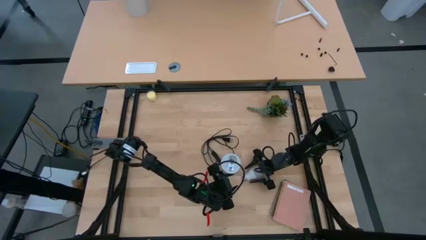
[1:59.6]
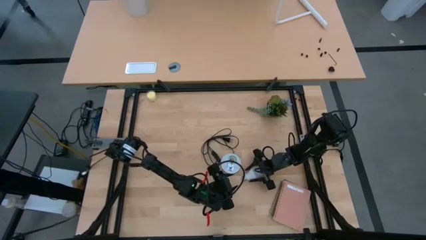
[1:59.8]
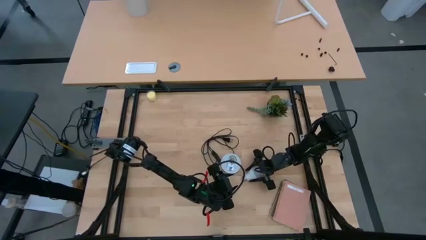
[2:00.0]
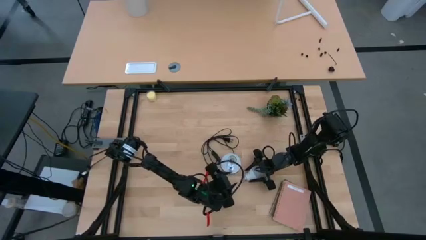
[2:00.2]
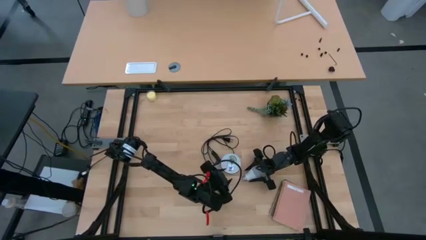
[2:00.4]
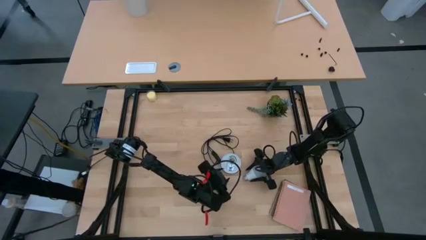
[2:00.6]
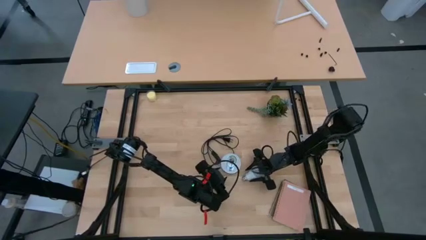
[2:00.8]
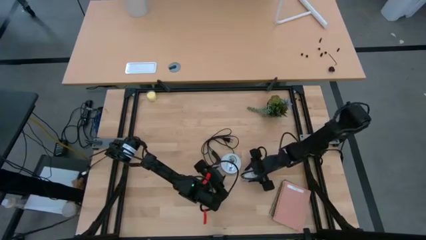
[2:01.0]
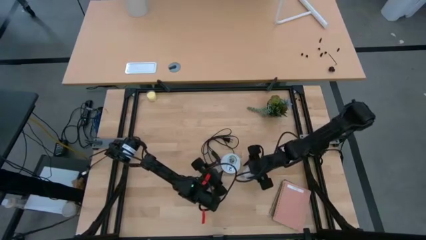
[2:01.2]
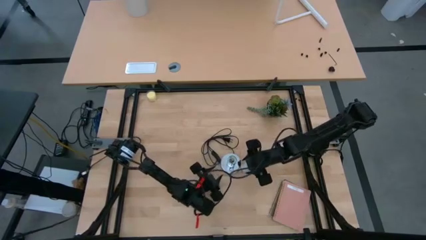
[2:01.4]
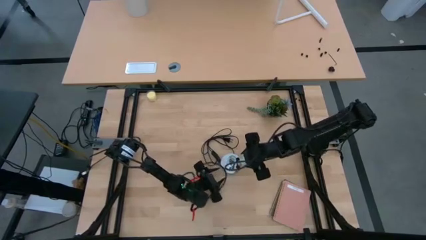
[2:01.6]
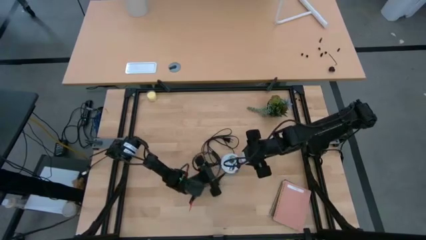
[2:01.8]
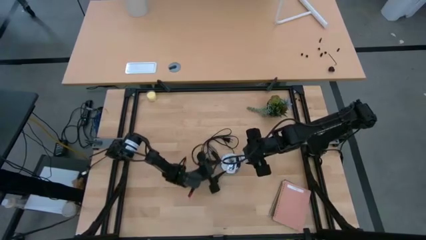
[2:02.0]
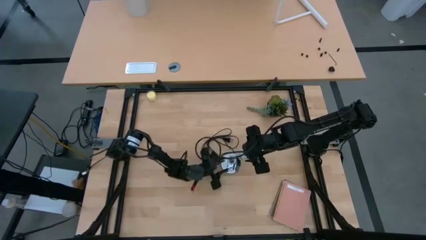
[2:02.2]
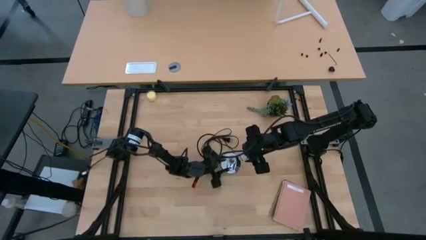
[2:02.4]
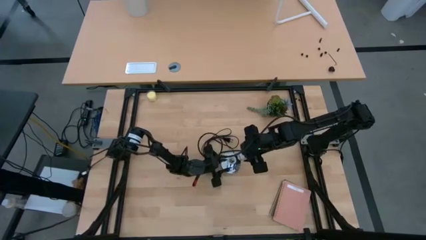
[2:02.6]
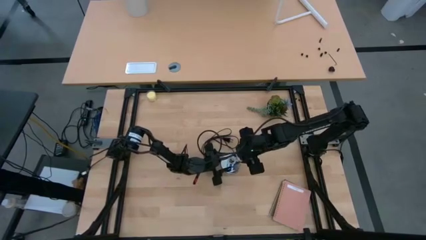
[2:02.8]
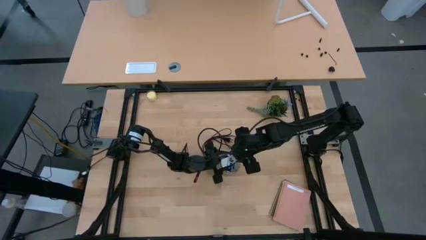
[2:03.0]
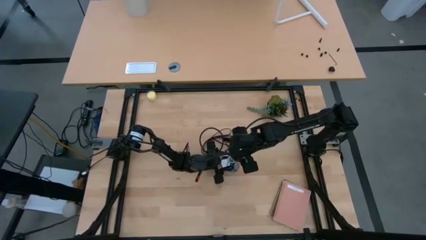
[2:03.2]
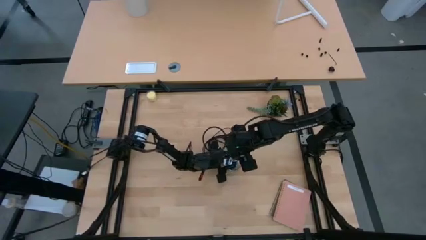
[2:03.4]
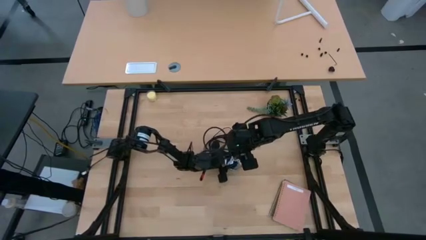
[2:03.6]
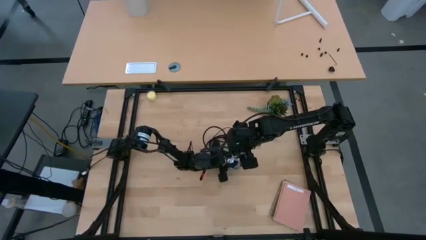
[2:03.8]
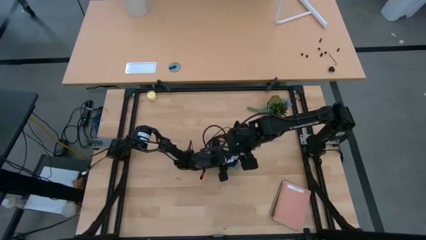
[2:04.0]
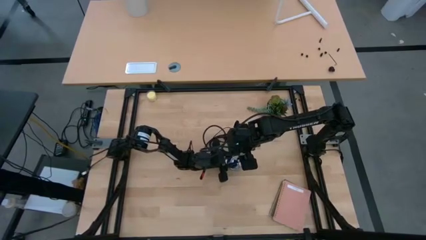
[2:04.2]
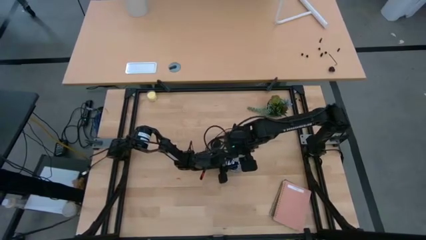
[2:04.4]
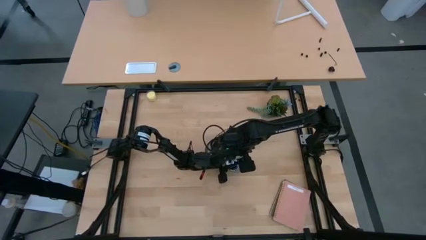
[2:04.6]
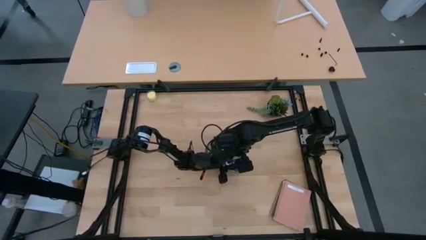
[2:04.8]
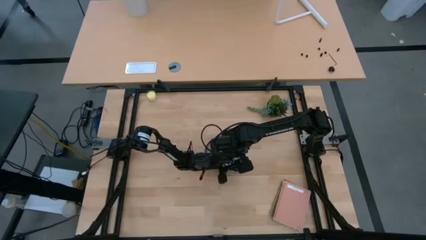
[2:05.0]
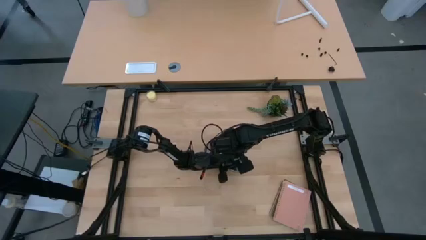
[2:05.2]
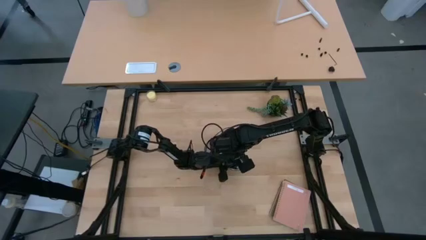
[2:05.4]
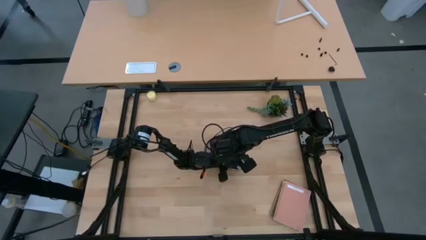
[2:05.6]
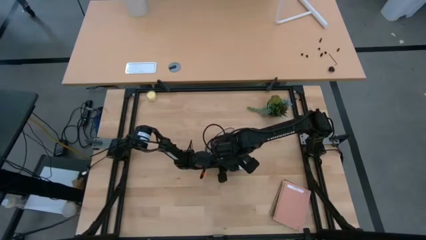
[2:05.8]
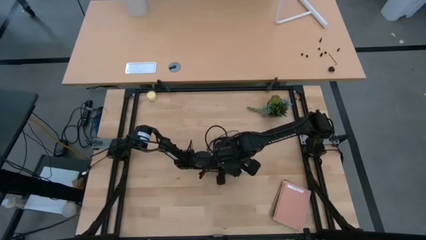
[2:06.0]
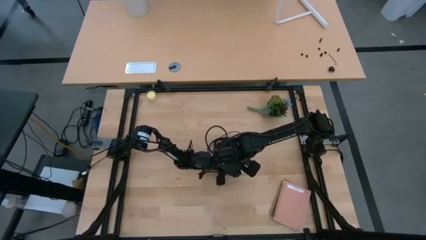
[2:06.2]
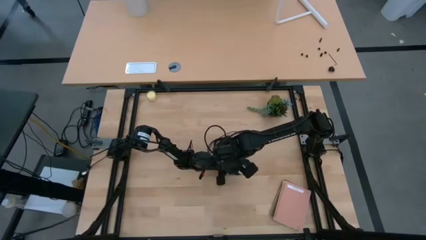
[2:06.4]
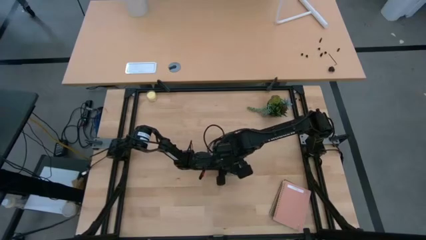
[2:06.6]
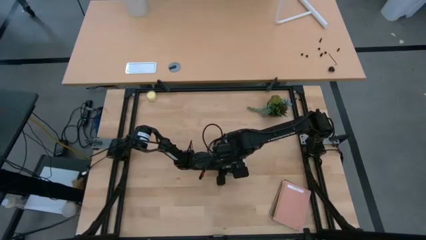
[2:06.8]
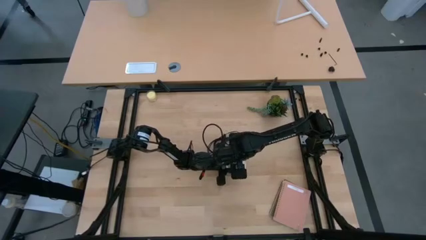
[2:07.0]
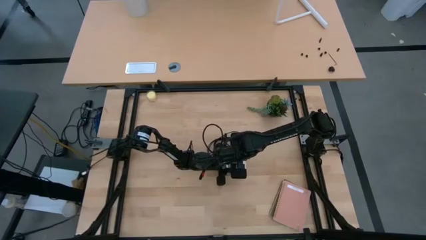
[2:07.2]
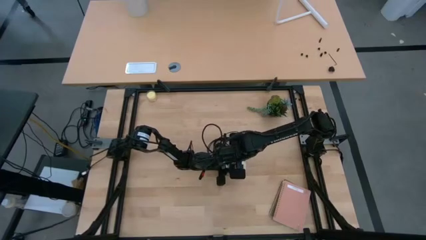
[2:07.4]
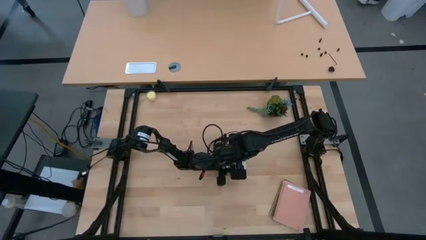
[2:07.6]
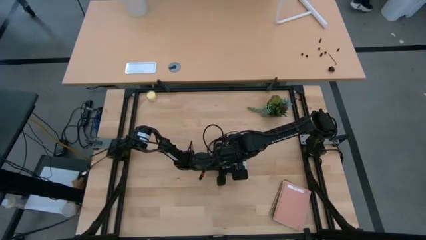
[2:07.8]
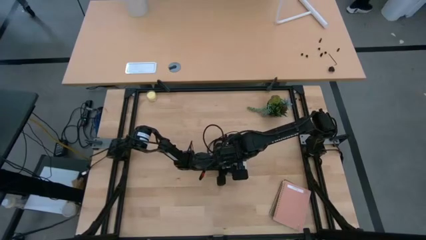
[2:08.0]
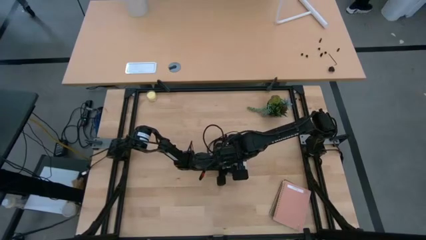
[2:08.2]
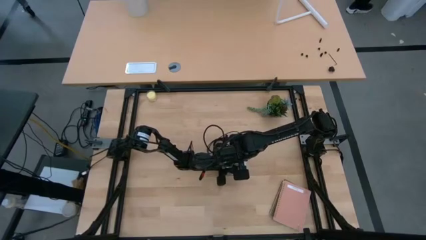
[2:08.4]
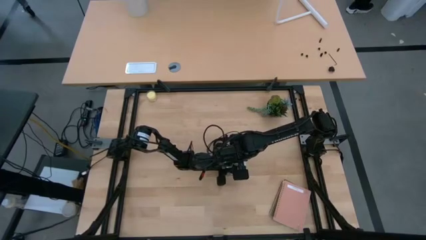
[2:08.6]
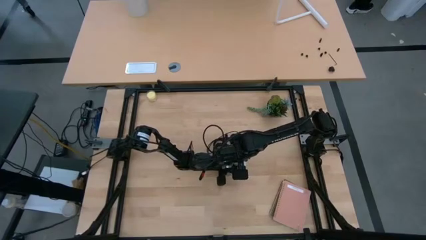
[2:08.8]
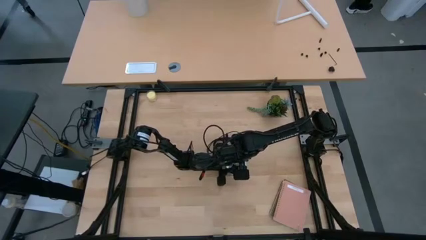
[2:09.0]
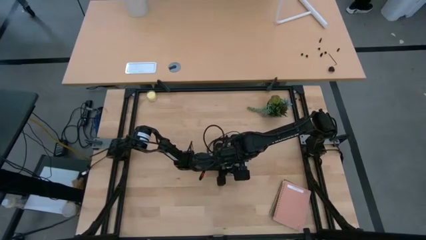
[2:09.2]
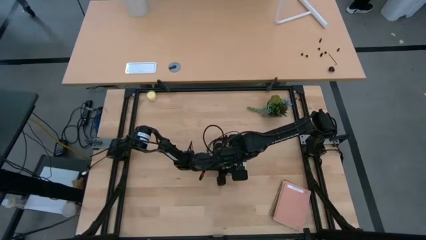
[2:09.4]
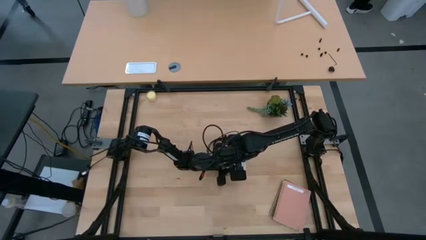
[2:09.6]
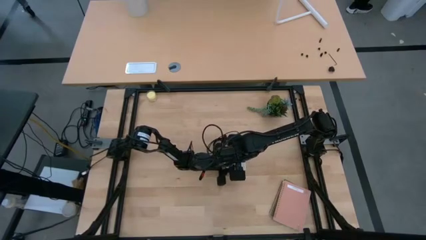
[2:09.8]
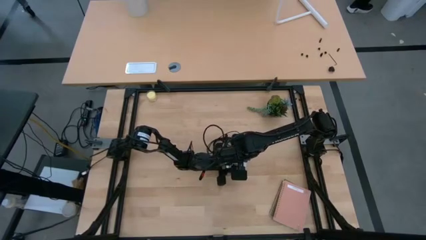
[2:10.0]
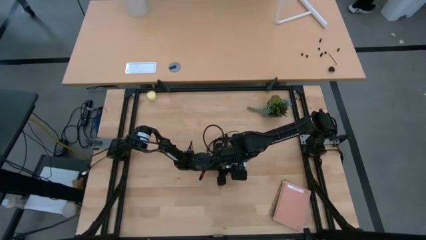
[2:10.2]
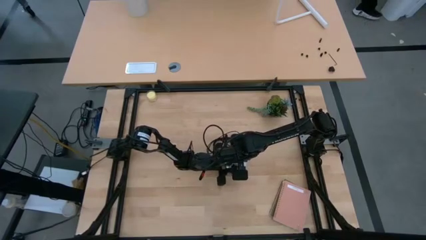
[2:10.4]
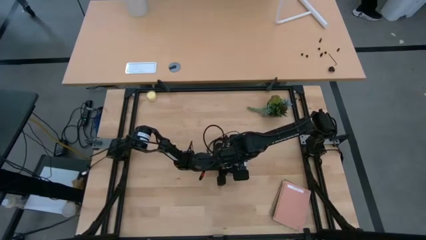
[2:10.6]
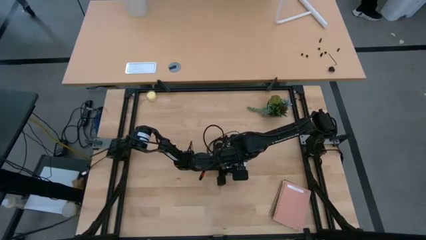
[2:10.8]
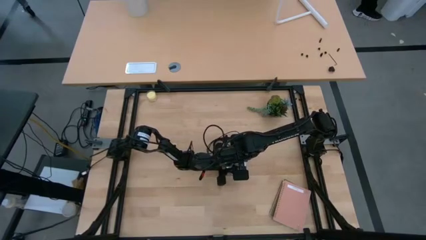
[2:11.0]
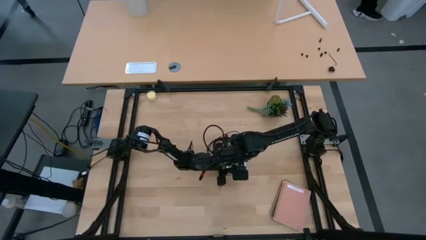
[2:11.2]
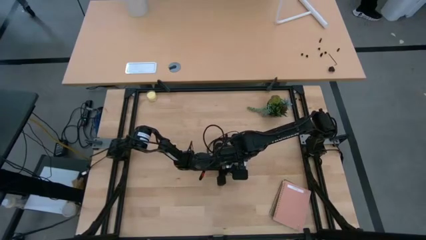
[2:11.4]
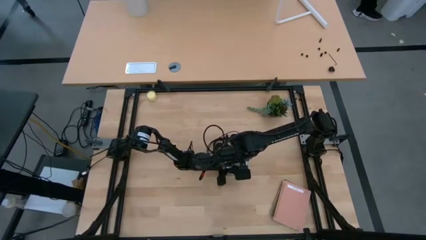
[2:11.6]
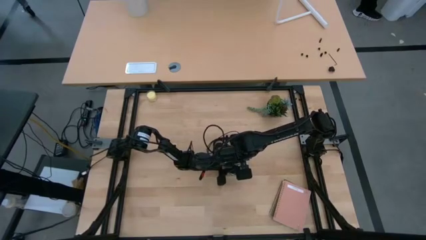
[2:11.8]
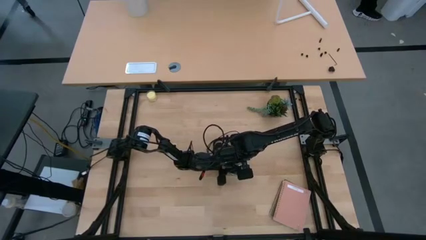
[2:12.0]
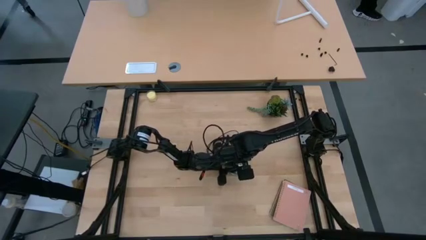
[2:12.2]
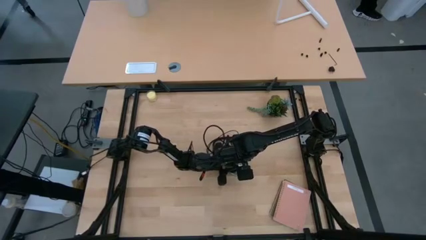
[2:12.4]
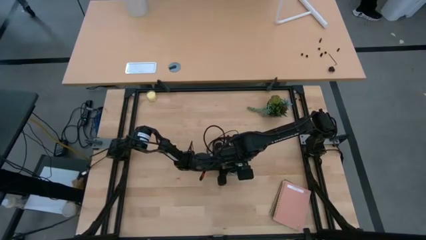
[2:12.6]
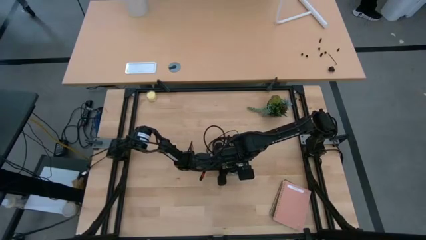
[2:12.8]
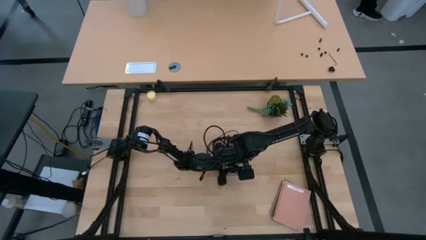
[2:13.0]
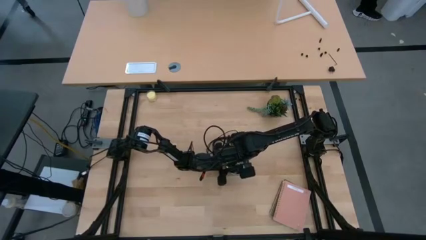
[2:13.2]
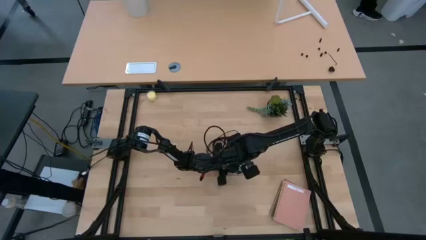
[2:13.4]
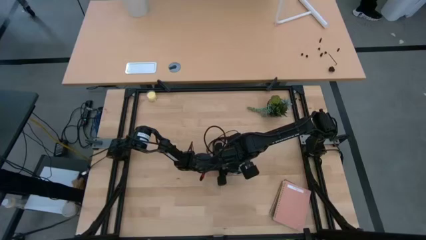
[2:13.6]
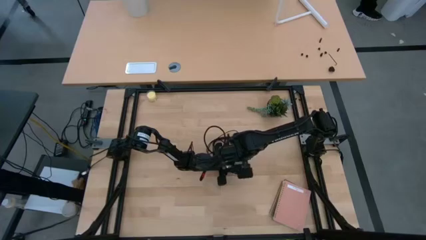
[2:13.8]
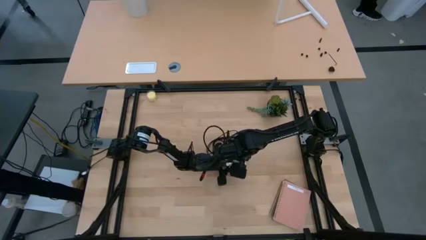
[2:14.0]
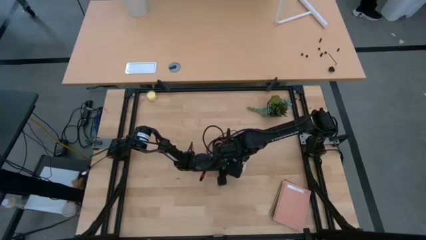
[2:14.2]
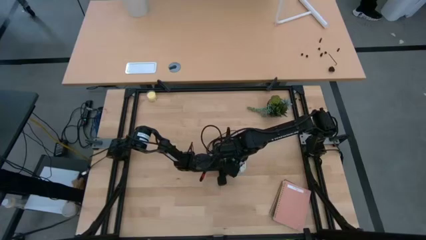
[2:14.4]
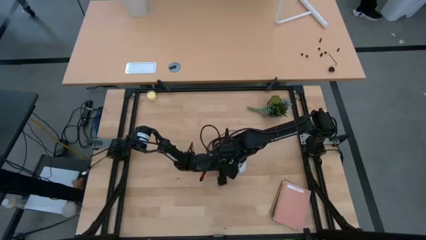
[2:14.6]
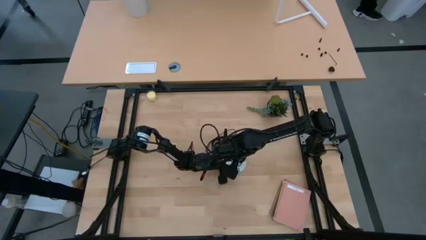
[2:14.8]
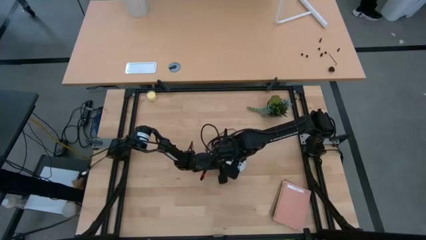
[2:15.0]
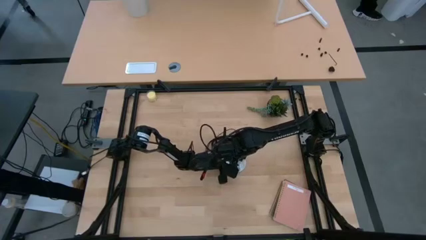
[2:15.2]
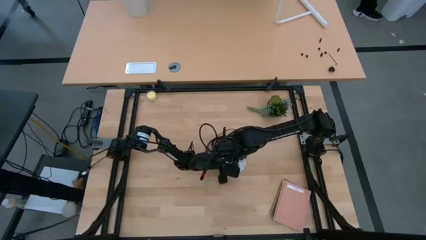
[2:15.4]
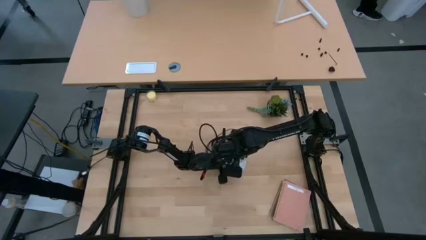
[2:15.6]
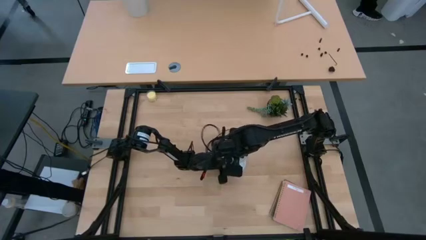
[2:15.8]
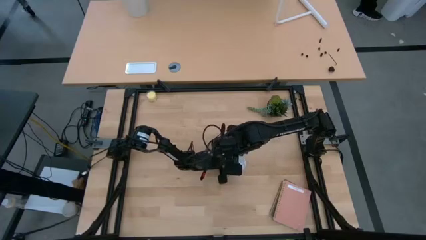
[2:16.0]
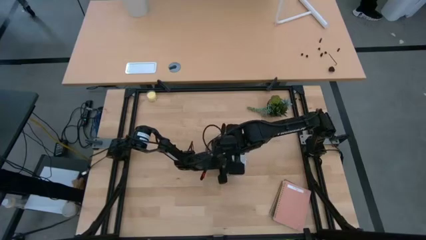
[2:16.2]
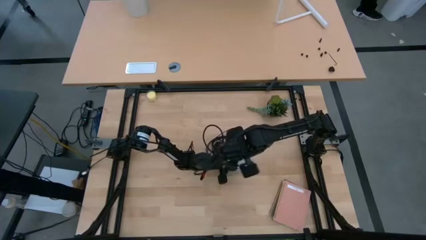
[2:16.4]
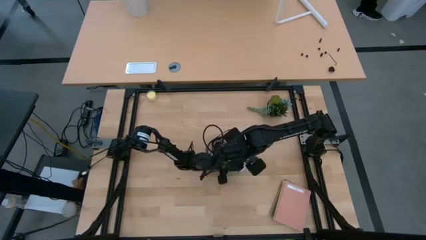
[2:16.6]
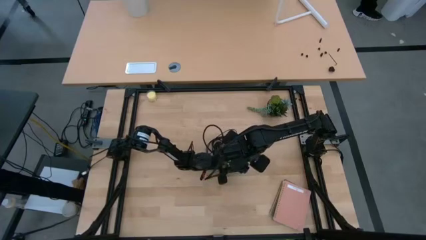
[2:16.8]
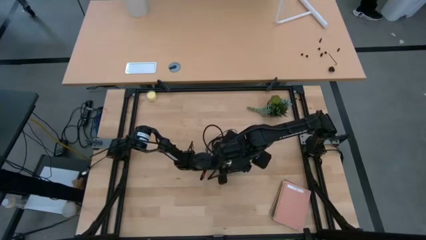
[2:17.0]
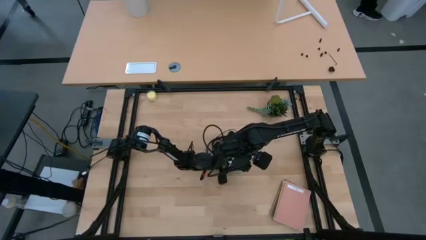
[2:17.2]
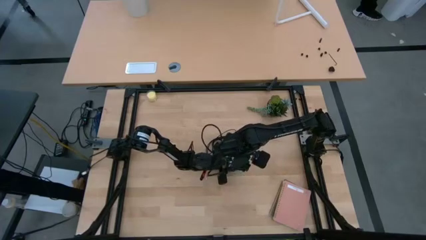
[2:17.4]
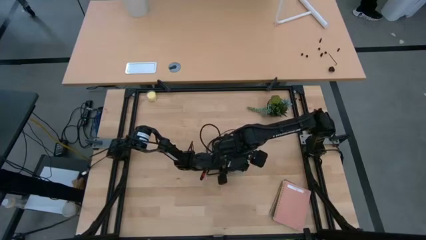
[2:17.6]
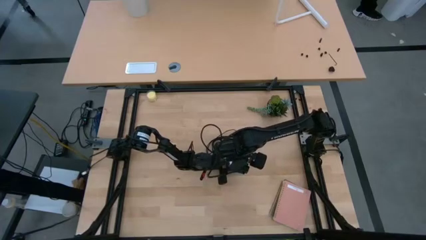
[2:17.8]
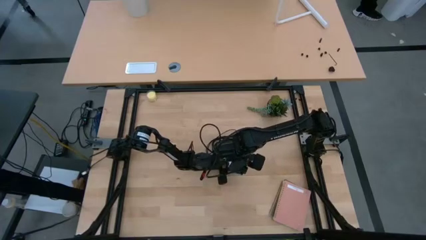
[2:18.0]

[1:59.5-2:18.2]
Task: Screw lightbulb
Insert the white lightbulb into the metallic lamp
